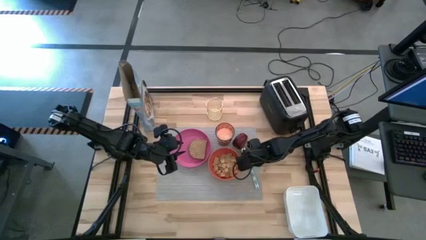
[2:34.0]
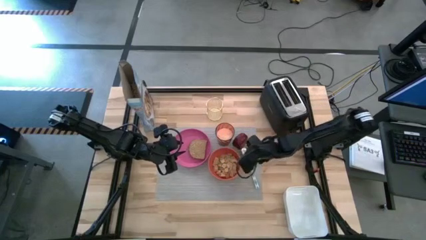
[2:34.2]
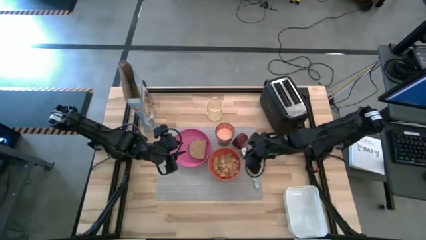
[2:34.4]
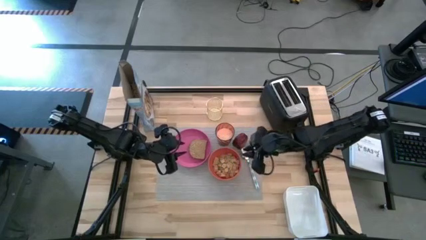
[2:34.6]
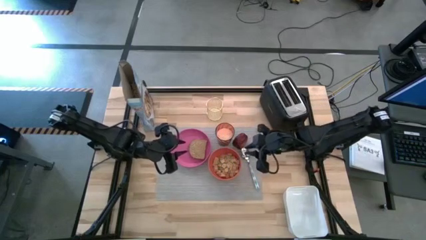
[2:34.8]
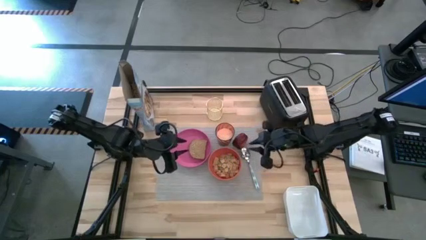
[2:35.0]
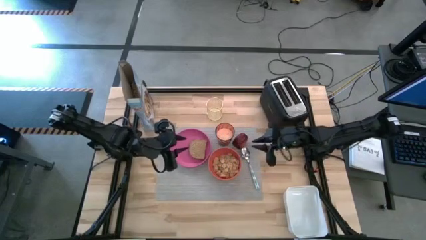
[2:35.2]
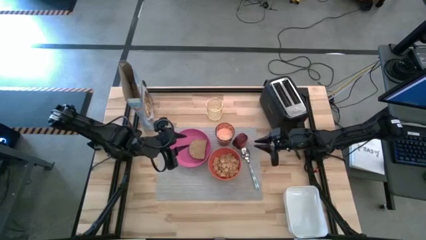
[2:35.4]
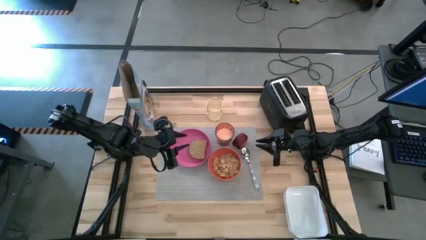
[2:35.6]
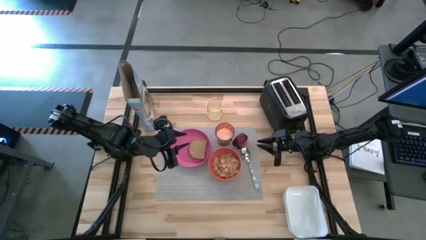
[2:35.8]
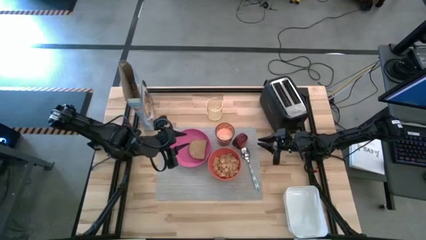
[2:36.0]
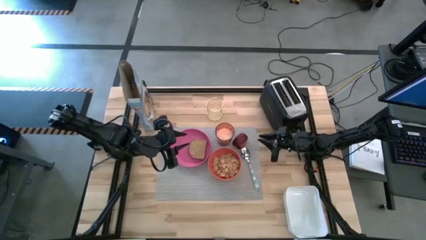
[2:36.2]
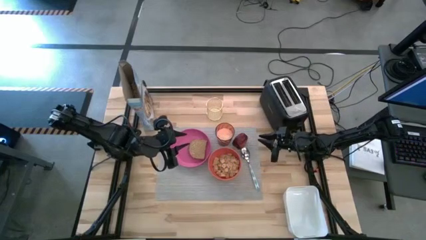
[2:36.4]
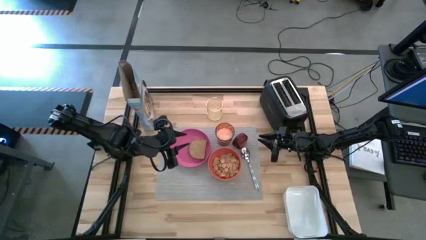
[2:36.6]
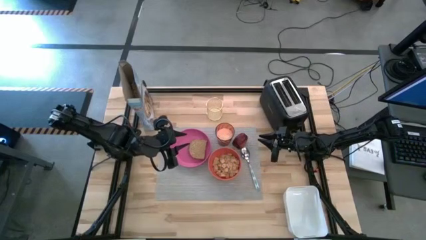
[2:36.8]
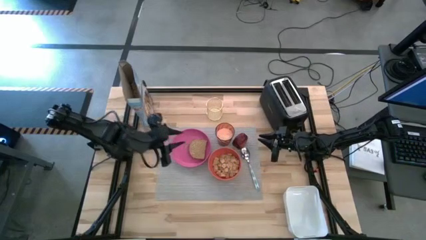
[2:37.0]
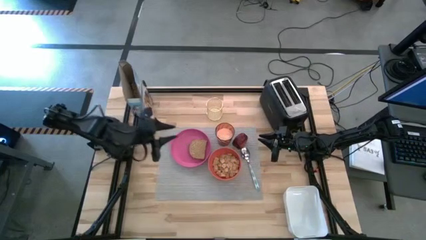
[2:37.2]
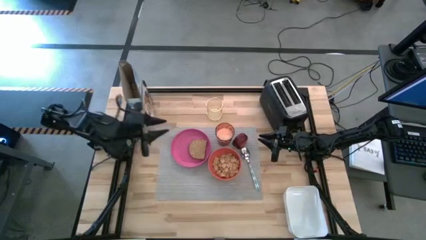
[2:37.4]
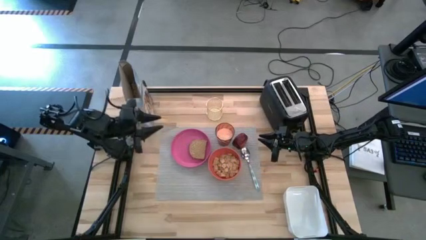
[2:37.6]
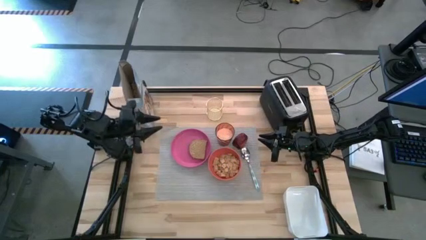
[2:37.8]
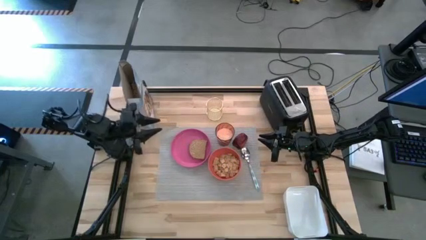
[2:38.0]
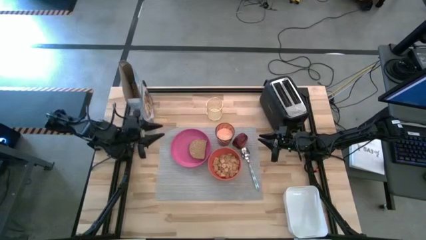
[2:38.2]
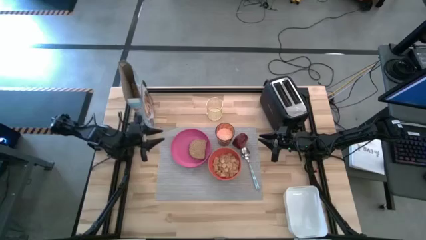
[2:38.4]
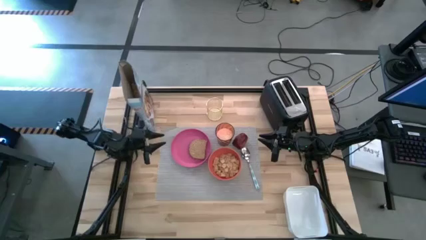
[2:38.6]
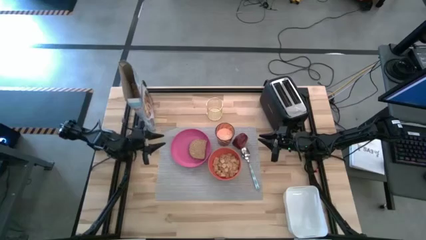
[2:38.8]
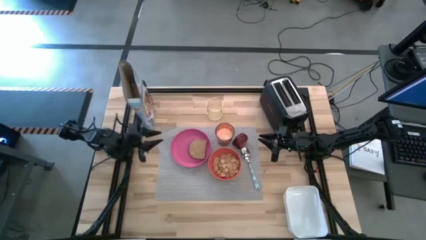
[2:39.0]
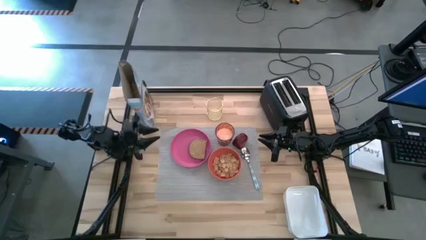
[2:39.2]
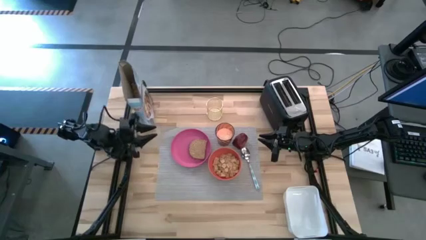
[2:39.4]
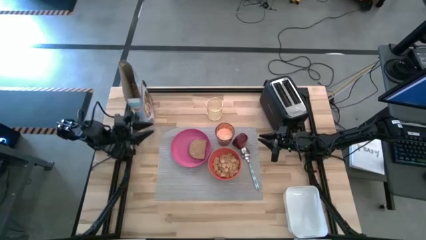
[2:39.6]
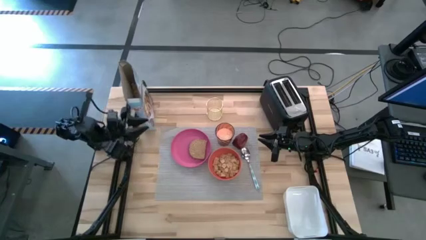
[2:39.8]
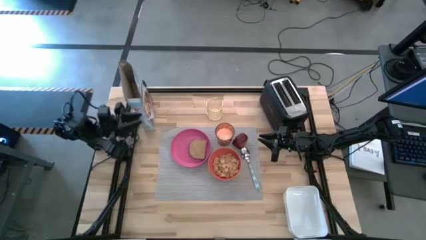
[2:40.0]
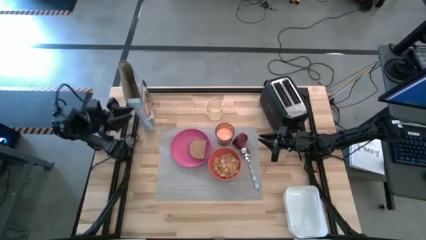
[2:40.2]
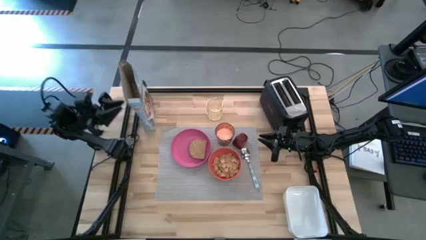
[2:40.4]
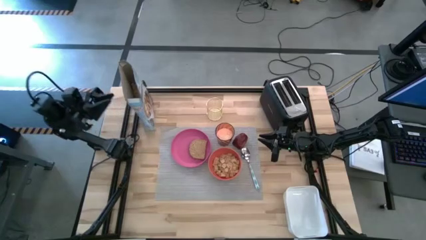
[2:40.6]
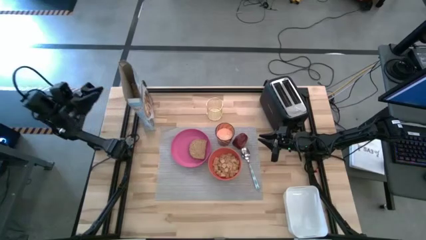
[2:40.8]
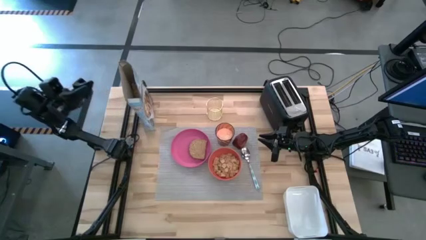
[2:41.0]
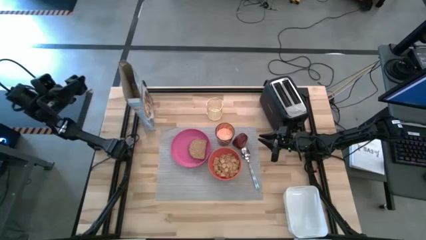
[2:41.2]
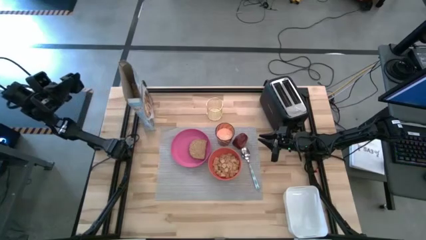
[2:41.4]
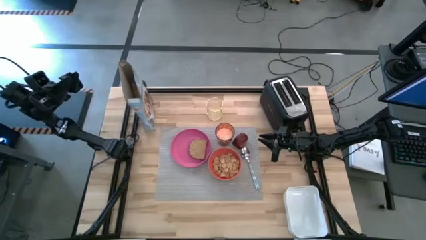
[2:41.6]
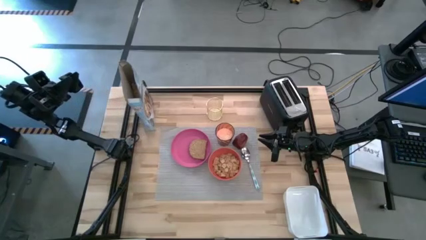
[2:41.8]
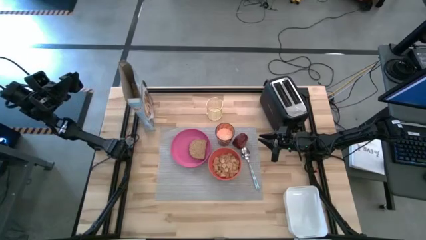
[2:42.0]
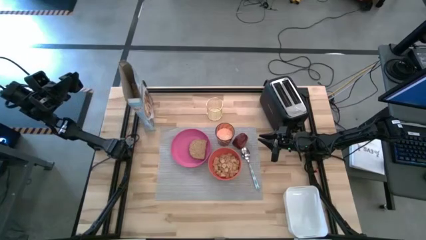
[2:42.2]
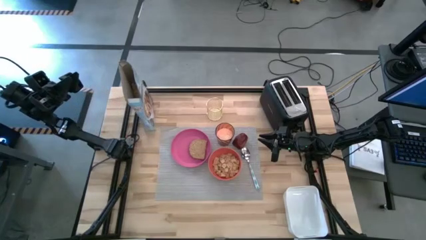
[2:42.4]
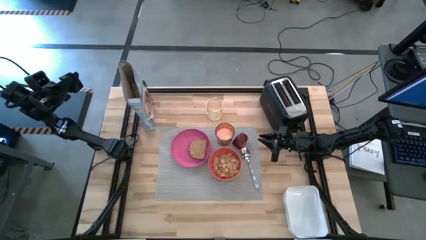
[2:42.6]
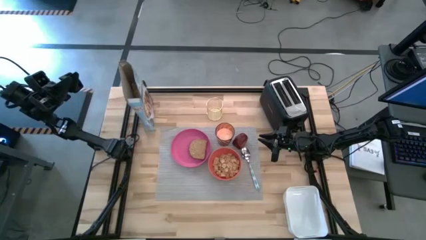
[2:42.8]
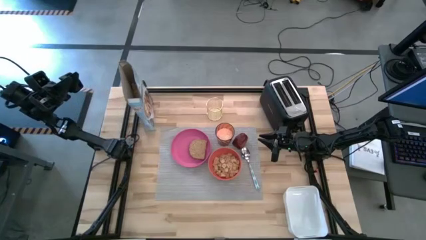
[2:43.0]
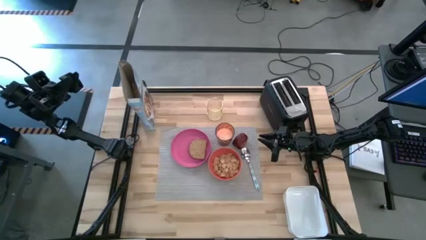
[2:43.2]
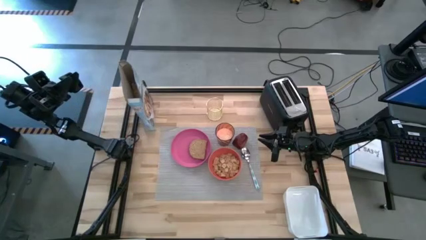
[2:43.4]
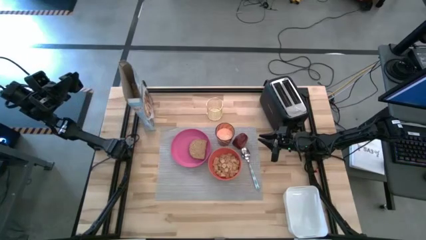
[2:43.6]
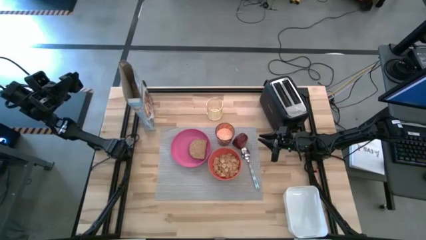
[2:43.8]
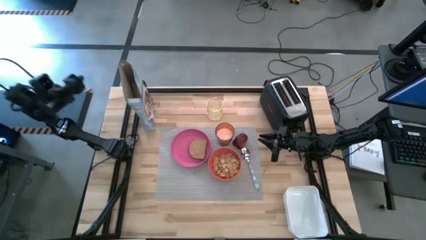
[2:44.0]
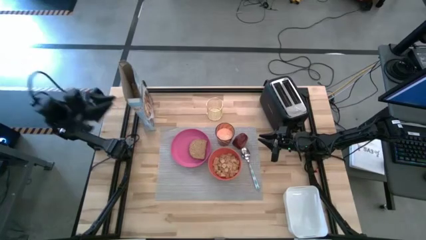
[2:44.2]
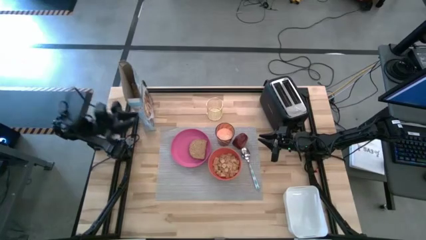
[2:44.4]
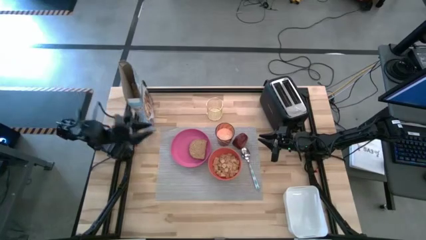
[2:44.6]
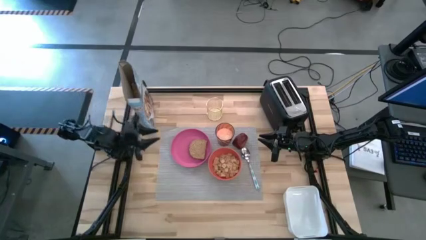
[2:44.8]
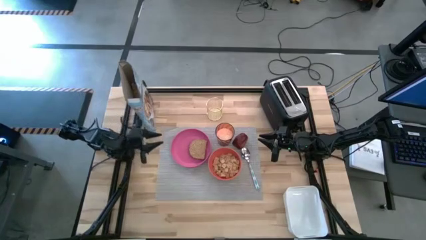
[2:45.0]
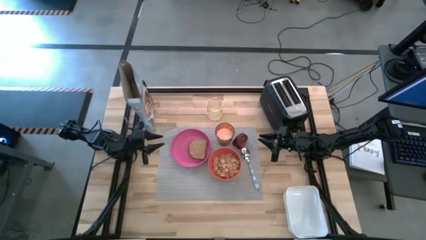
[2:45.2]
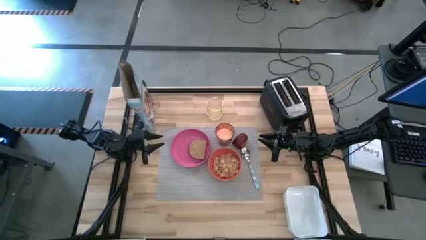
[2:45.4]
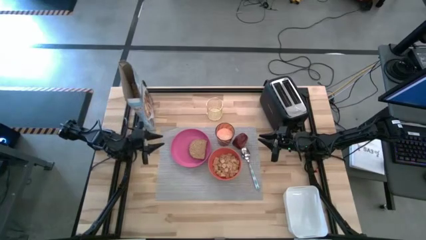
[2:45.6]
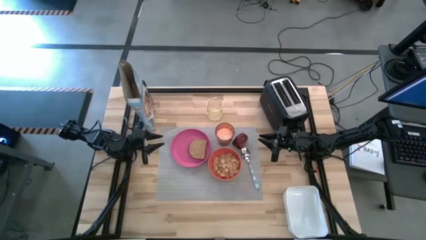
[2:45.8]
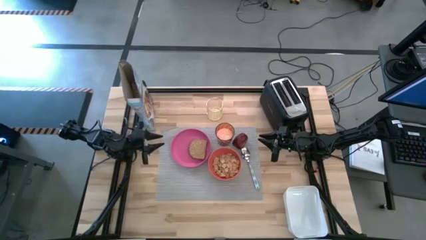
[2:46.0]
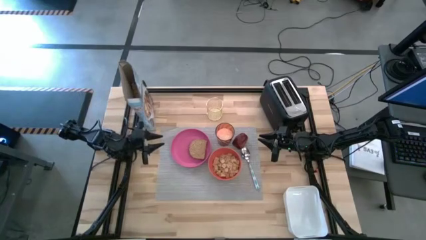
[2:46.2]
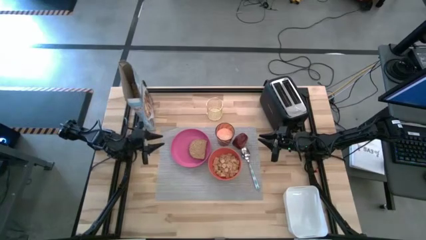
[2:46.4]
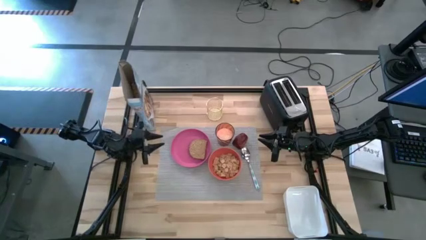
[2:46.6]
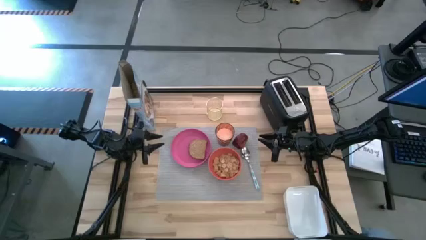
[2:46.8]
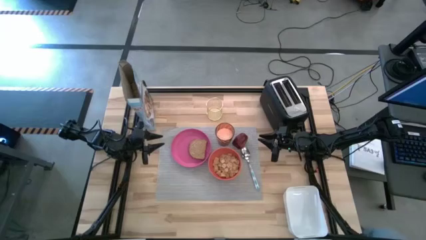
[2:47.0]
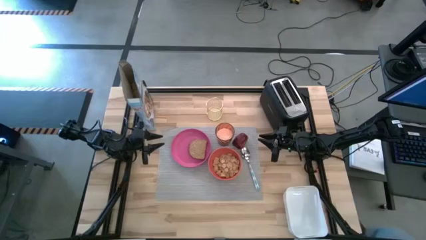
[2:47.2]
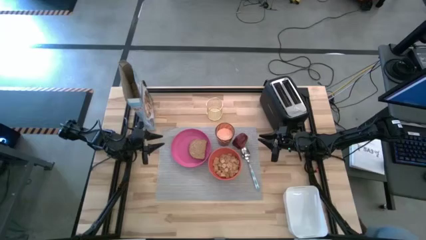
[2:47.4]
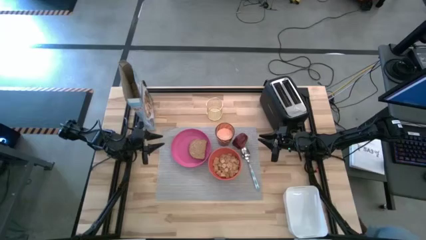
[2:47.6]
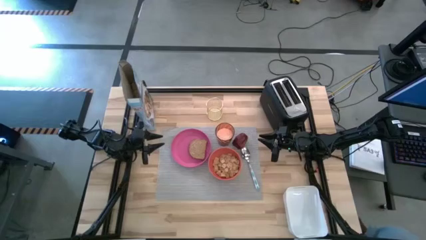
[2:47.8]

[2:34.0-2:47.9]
Task: Arrange a breakfast setting
Return to Home Position

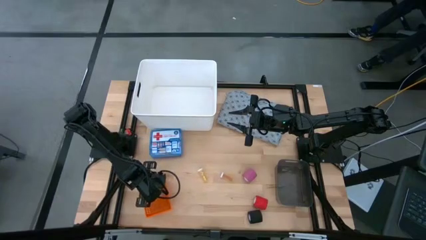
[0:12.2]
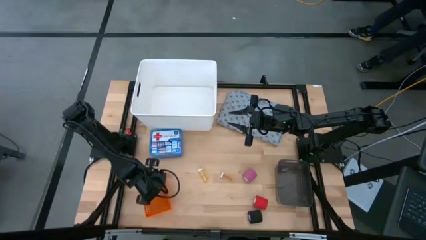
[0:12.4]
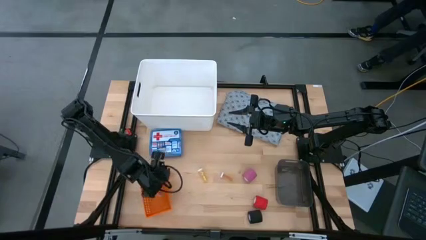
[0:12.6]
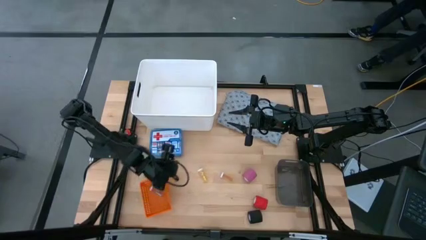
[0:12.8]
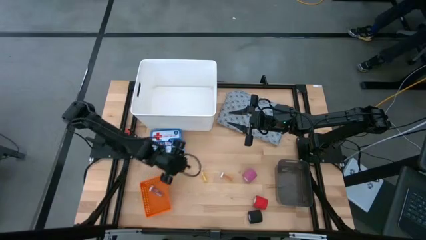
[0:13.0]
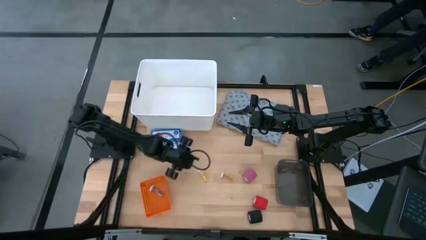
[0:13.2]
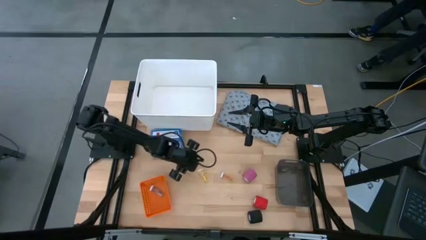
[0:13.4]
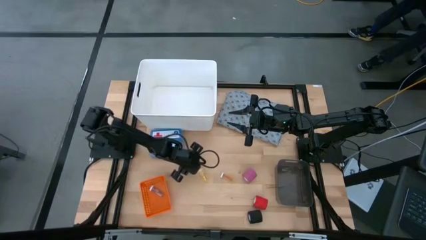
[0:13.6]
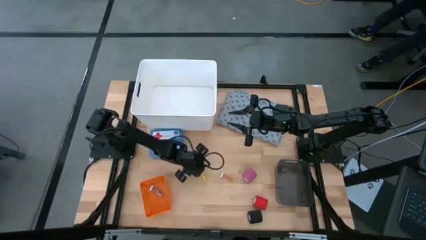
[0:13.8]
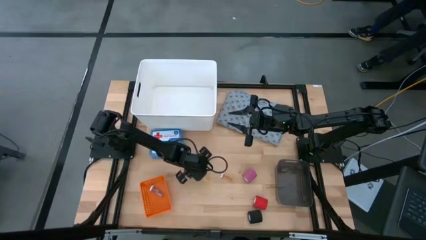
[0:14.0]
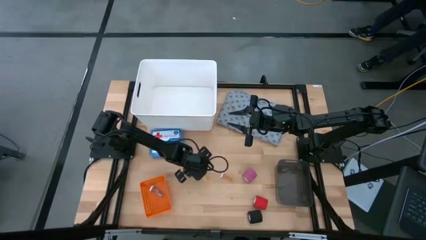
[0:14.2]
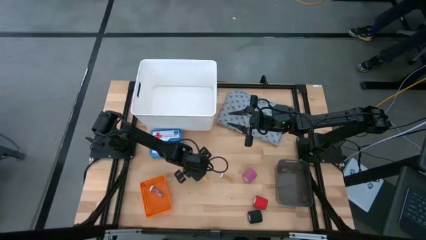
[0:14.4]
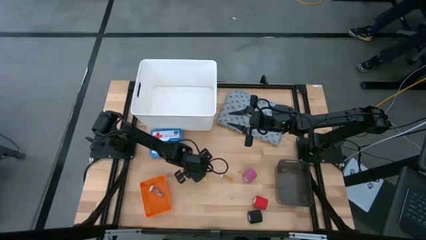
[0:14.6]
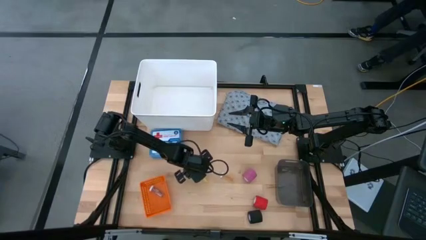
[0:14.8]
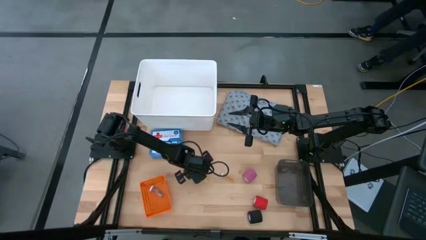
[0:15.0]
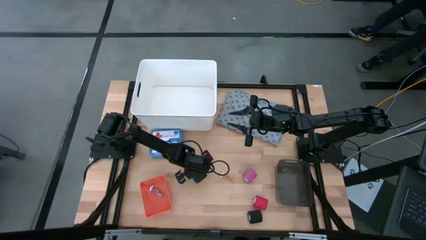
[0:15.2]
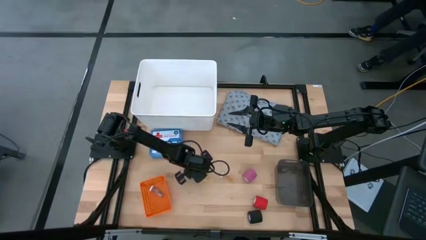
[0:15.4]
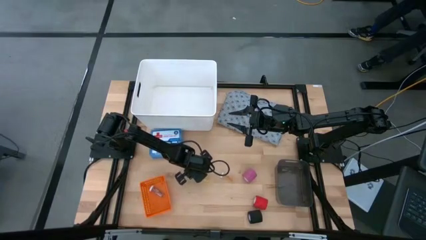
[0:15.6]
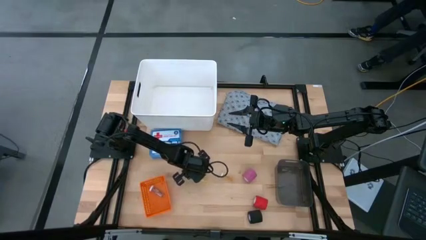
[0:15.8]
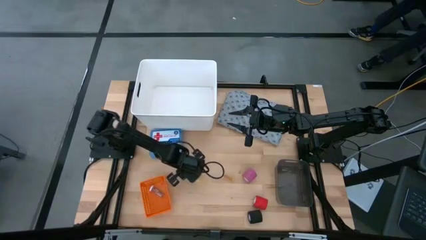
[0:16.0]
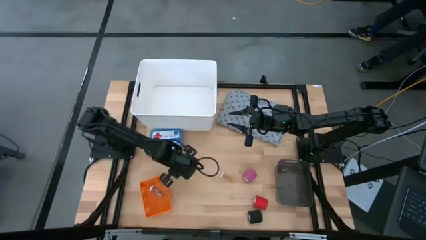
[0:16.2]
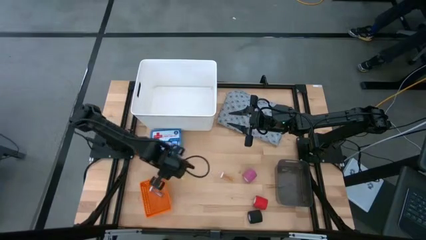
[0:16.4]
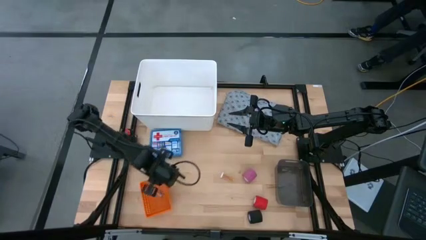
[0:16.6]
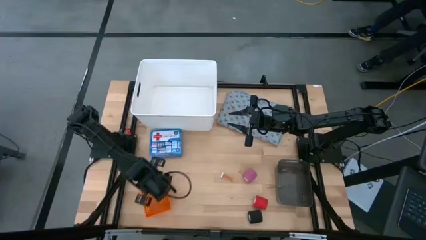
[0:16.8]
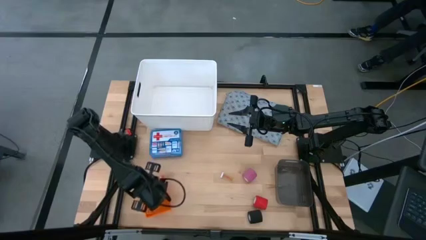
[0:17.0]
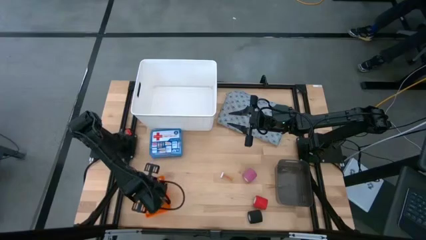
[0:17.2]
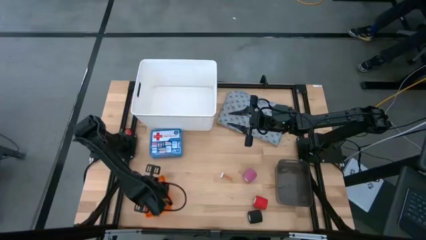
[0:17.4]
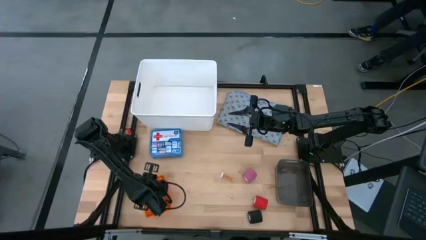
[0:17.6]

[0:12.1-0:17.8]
Task: Pick & place medical supplies in basket/bin
Put the left yellow pill bottle into the orange bin
